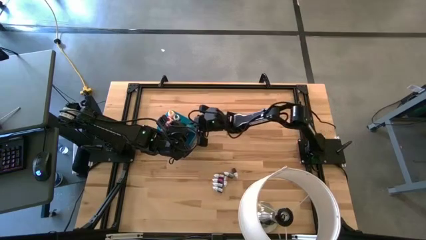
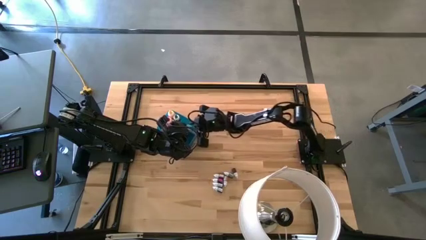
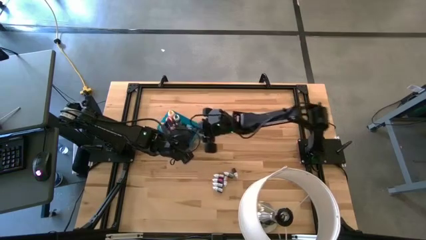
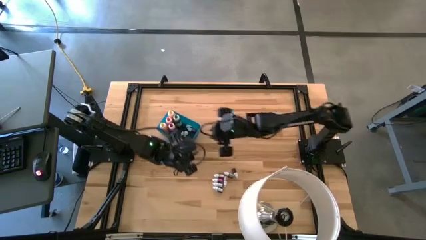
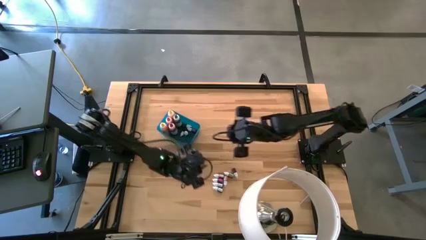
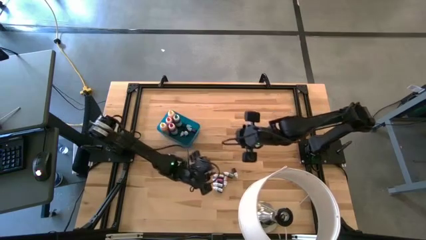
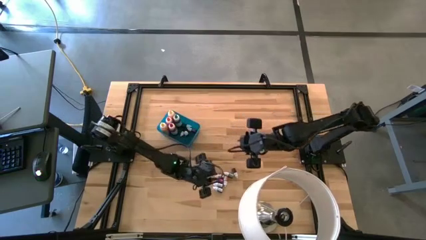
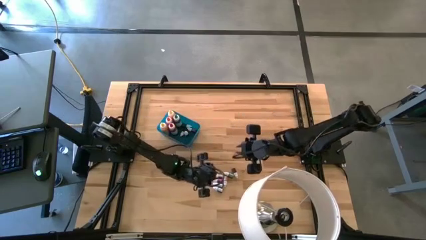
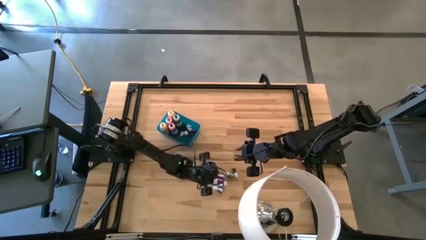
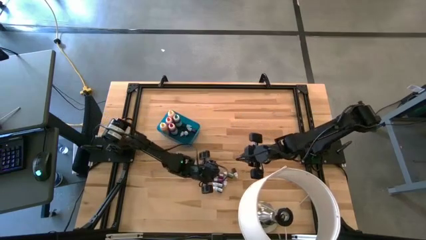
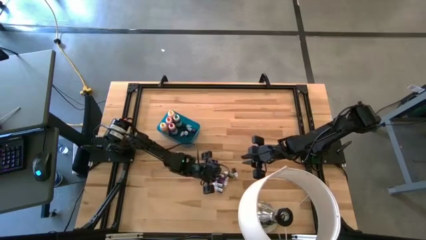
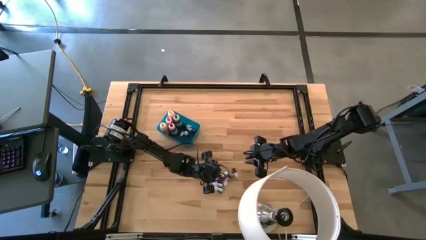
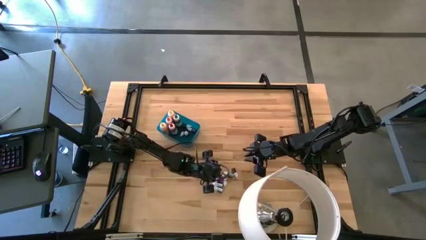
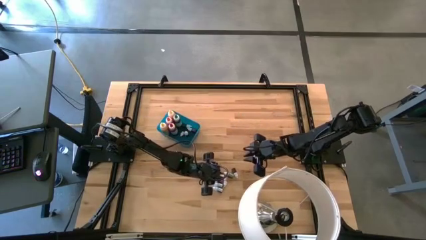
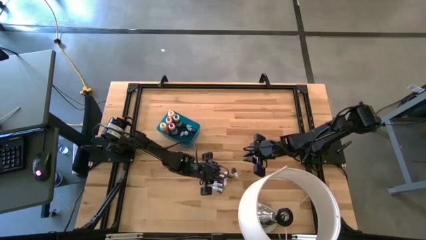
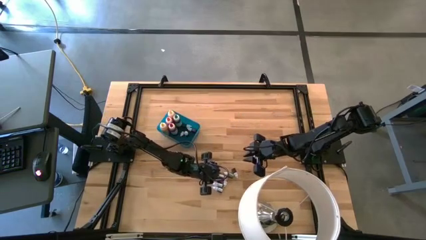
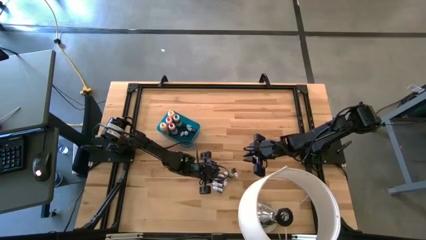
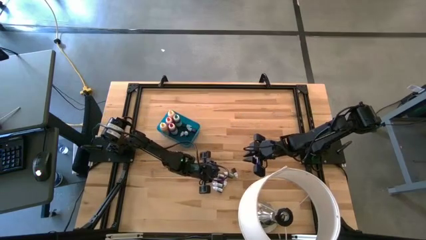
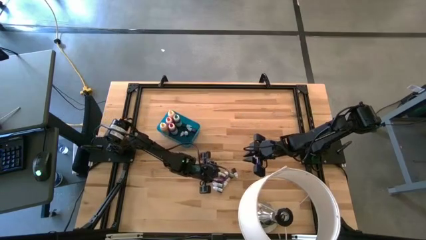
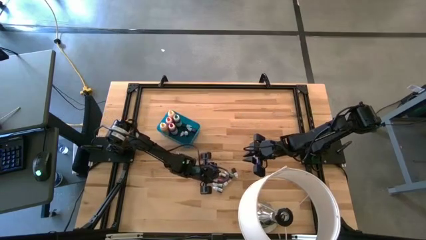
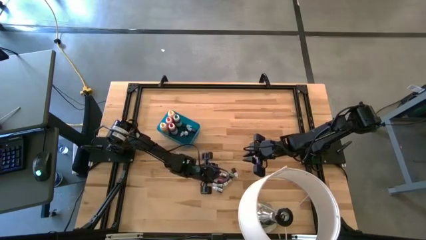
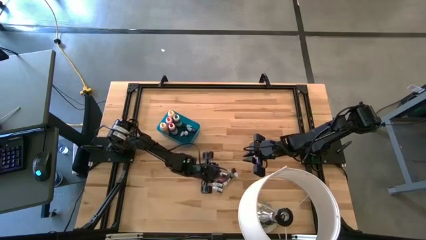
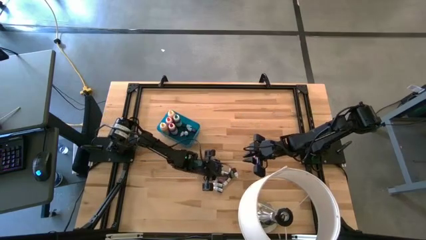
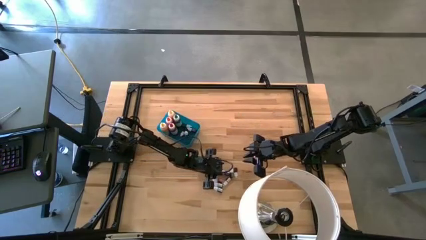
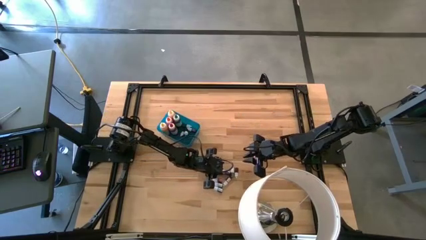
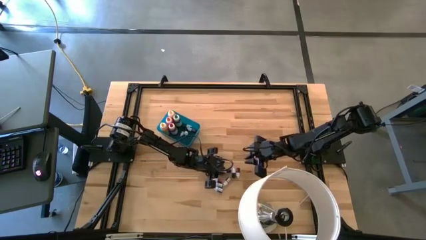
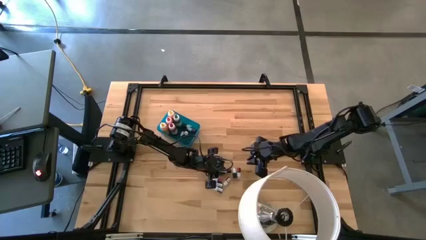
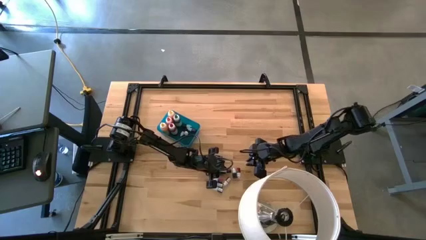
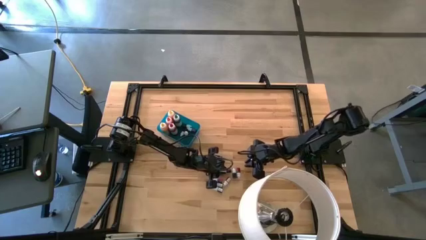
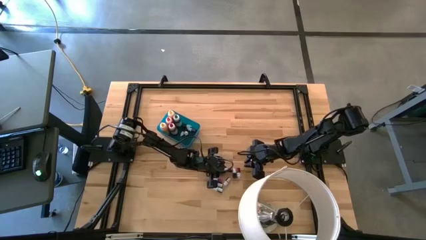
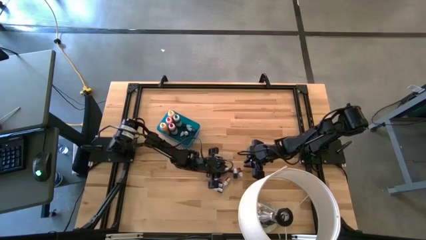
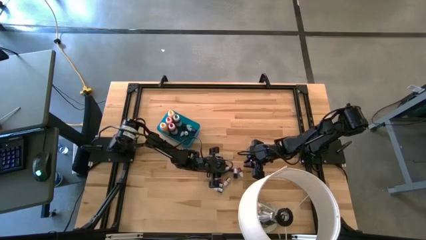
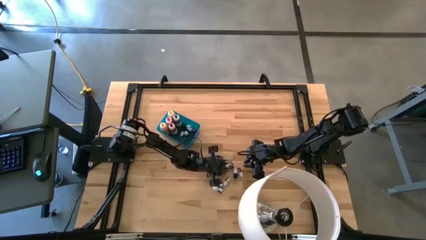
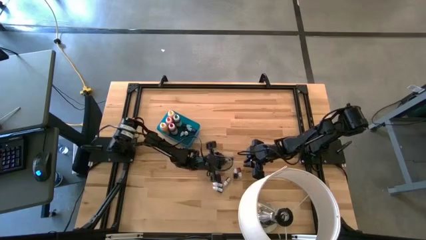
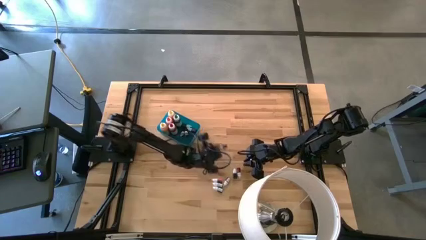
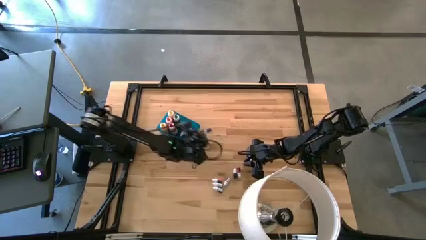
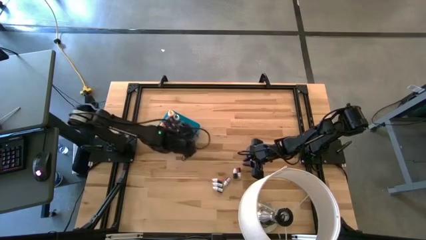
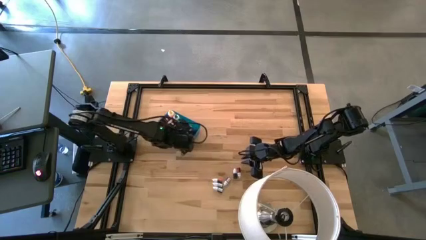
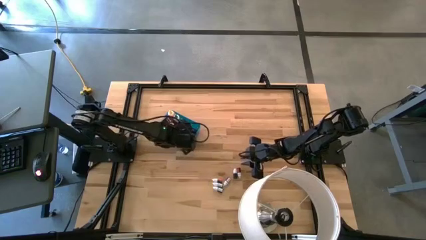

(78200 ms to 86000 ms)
Task: Pick & Place food coloring
Put the small blue food coloring bottle into the blue bin

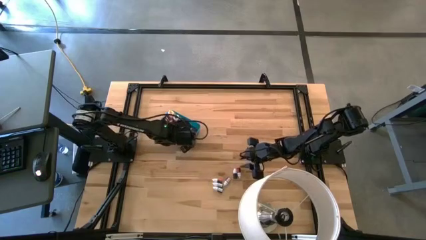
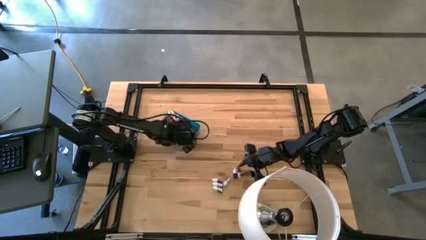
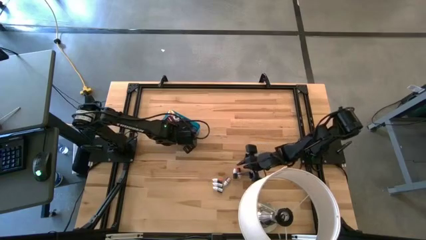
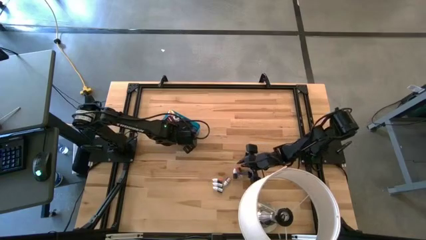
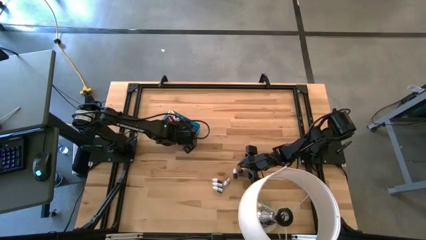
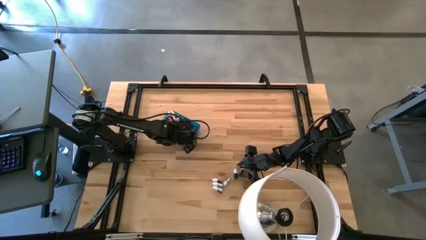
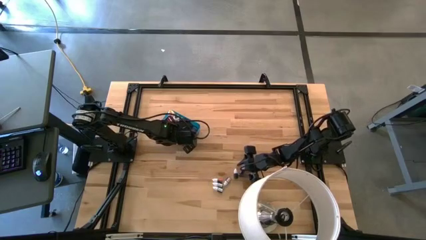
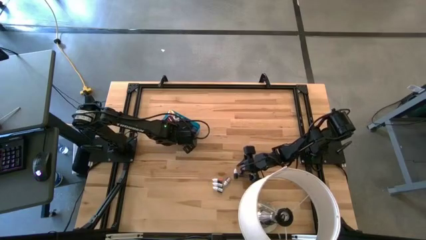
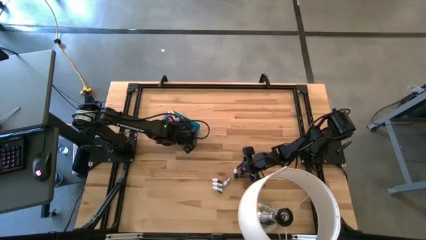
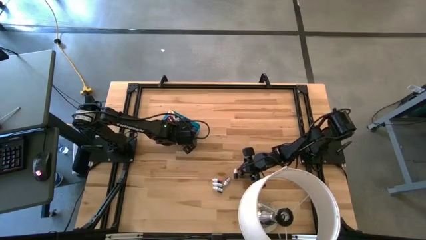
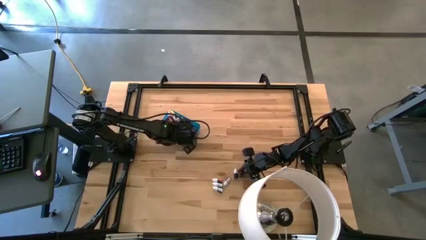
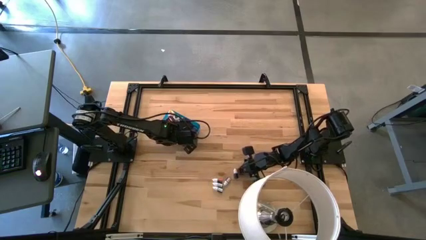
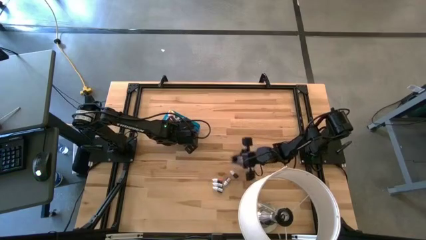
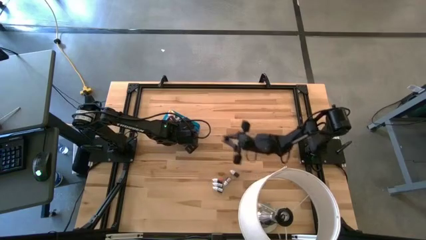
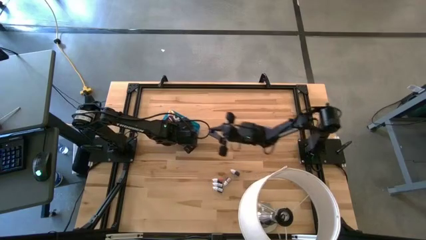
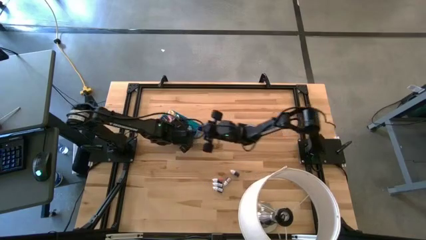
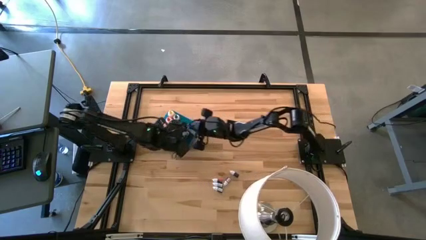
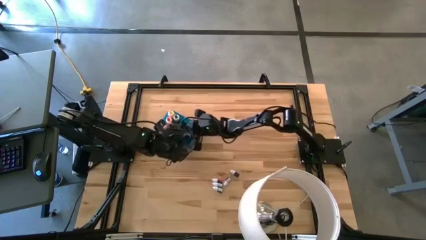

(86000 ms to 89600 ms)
Put the small red food coloring bottle into the blue bin

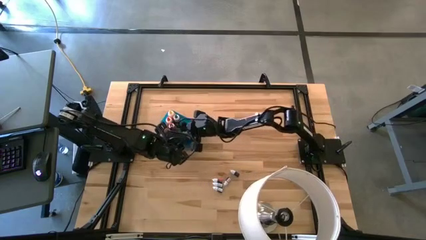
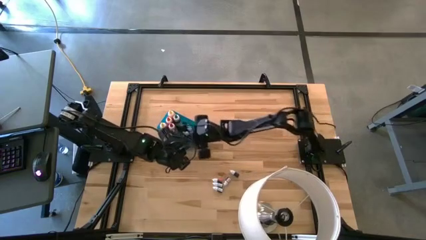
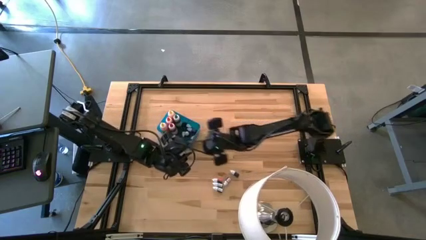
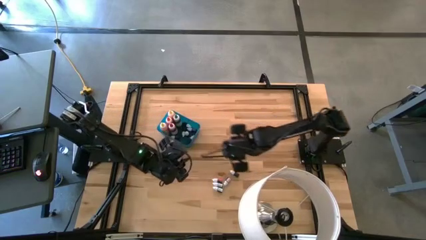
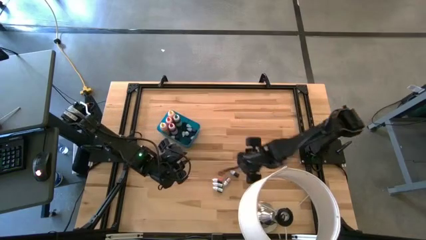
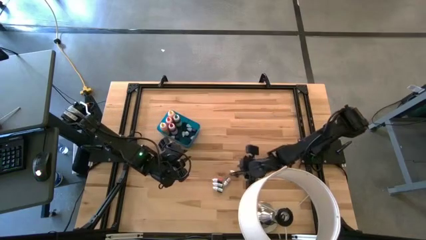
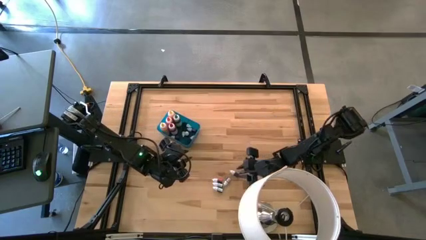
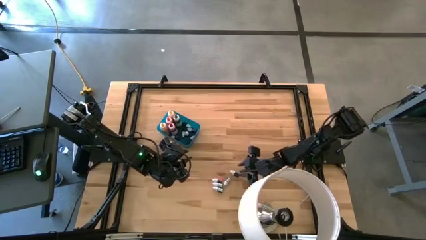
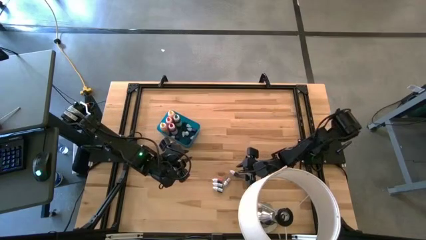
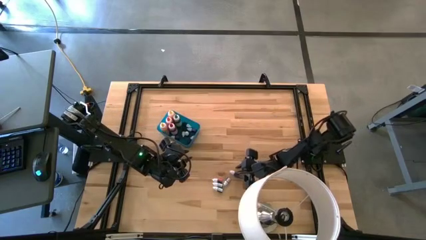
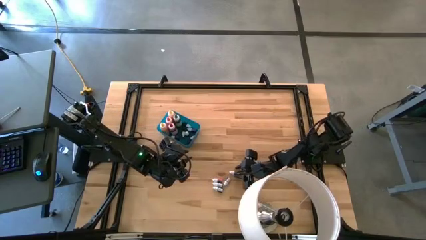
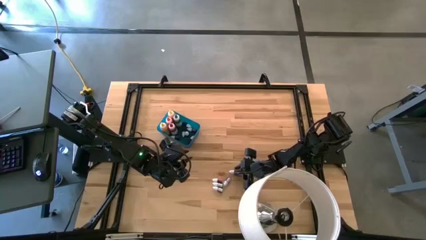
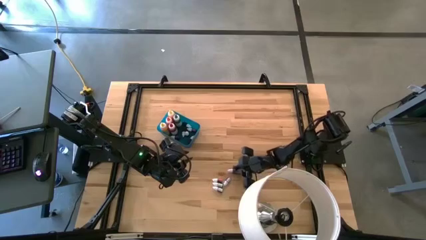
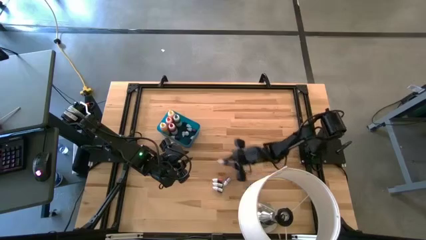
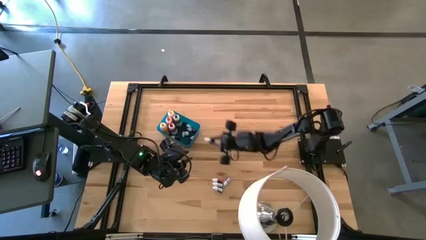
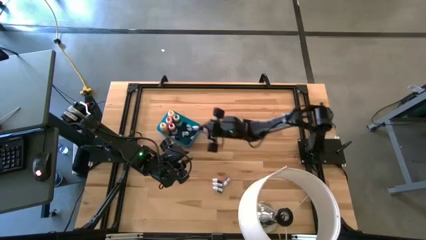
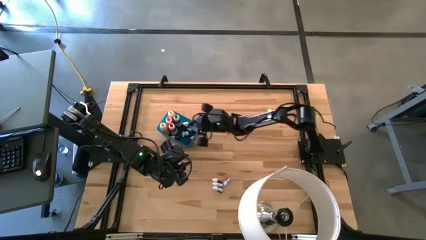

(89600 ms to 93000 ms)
Put the small green food coloring bottle into the blue bin

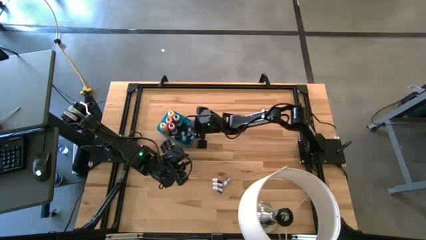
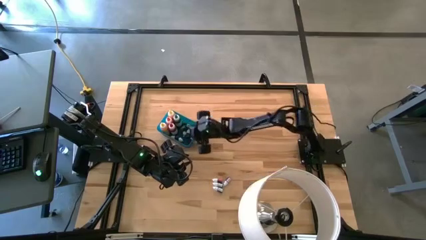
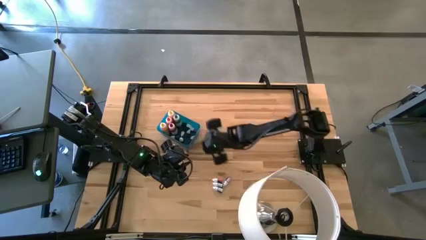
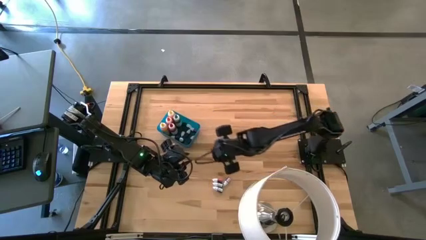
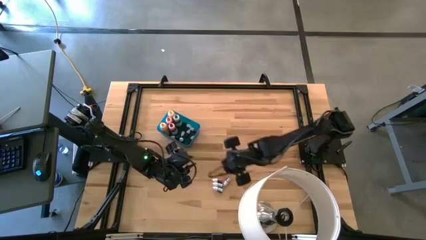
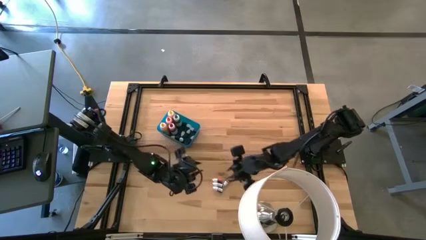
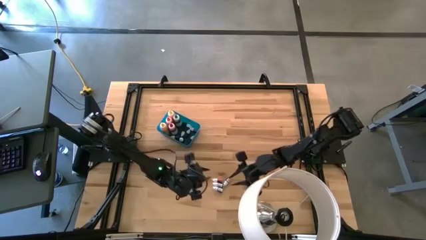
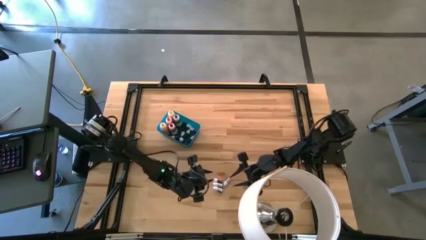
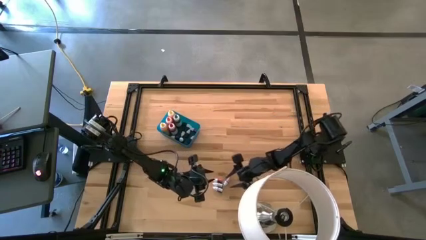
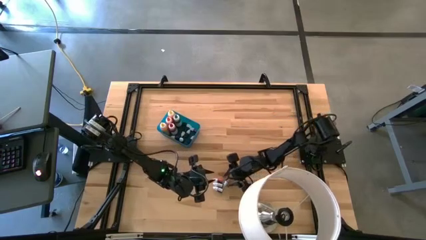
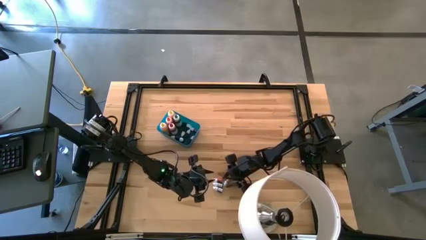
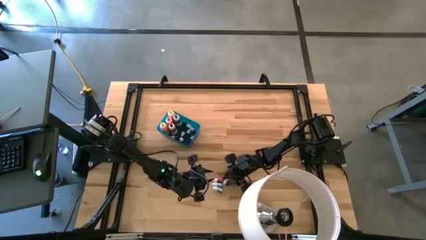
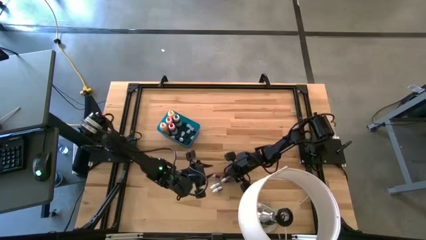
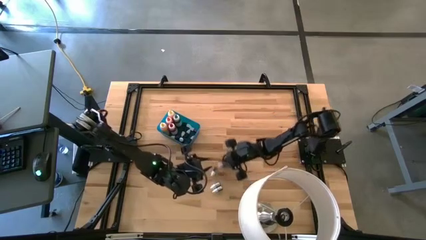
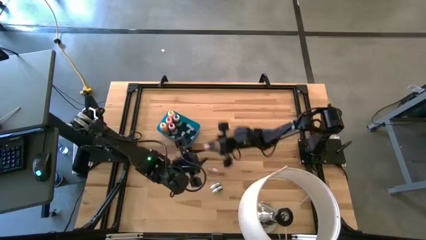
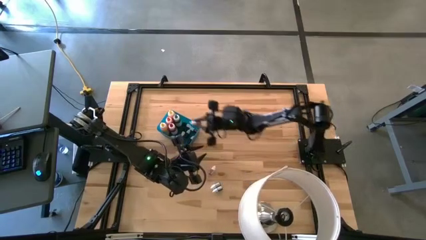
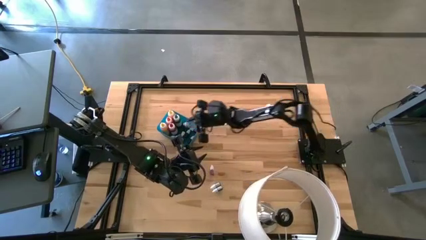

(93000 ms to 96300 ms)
Put the small orange food coloring bottle into the blue bin
